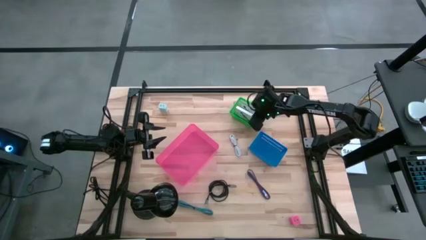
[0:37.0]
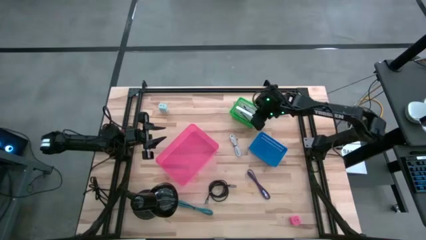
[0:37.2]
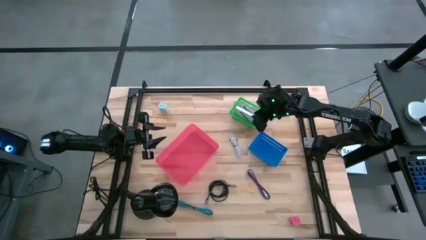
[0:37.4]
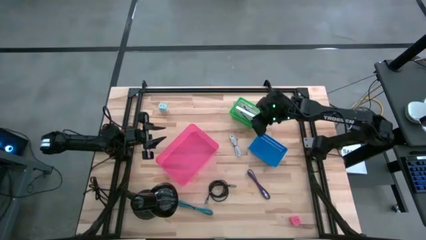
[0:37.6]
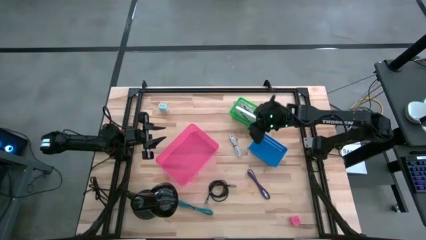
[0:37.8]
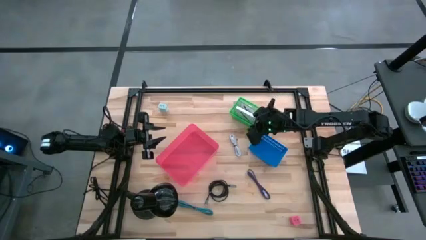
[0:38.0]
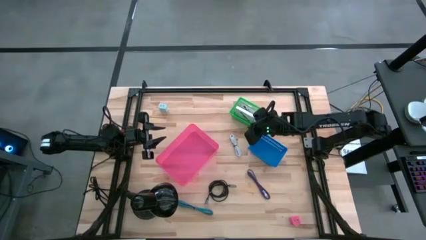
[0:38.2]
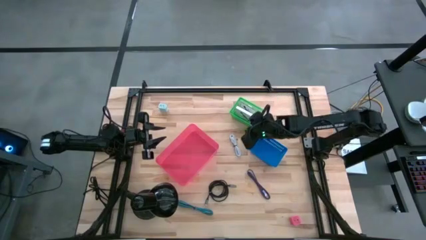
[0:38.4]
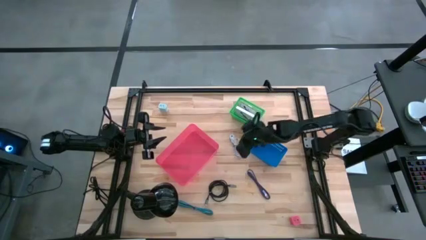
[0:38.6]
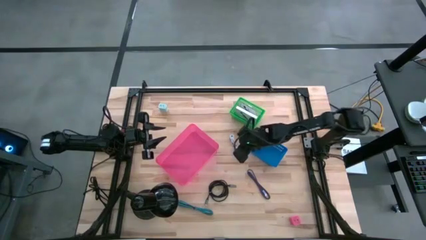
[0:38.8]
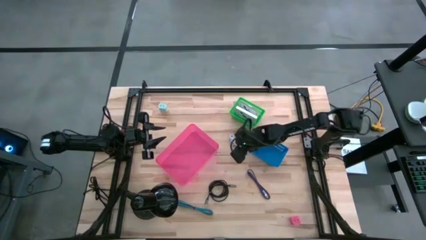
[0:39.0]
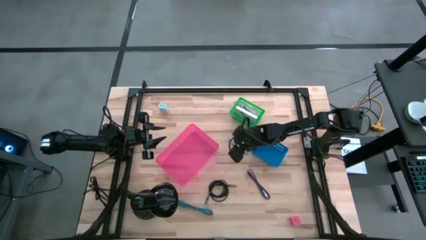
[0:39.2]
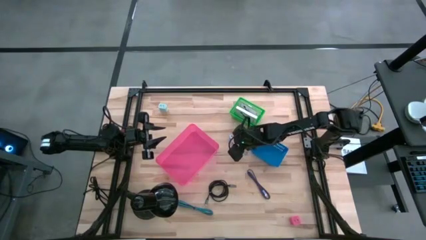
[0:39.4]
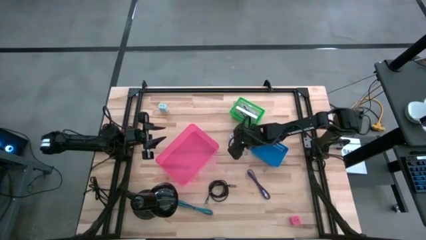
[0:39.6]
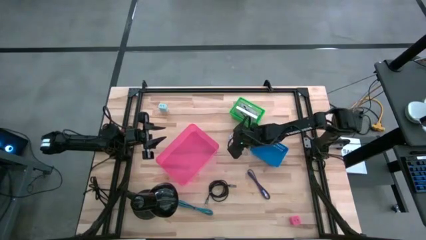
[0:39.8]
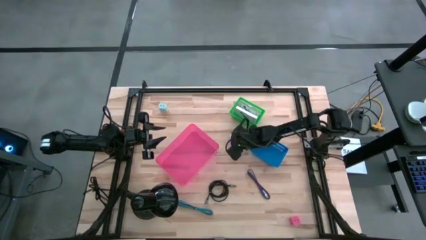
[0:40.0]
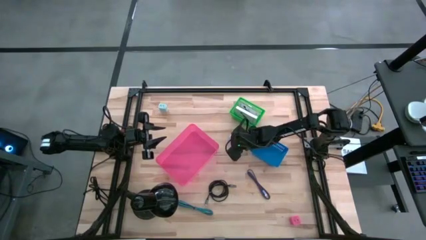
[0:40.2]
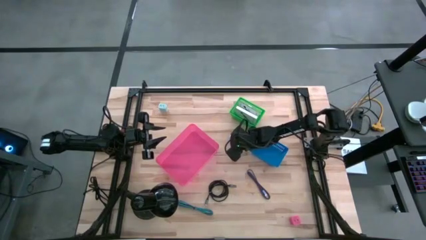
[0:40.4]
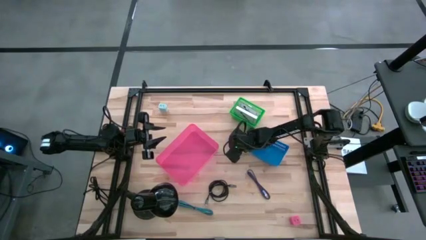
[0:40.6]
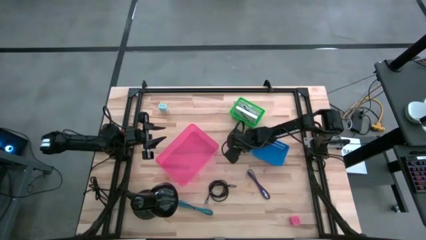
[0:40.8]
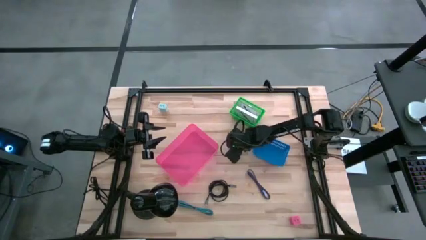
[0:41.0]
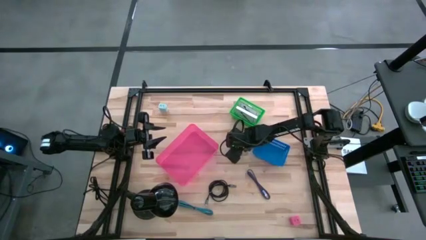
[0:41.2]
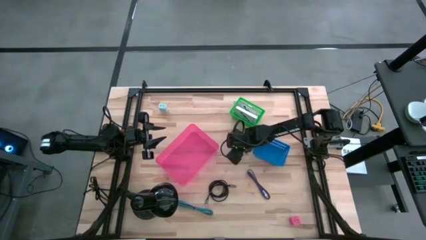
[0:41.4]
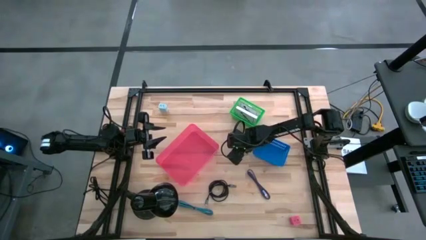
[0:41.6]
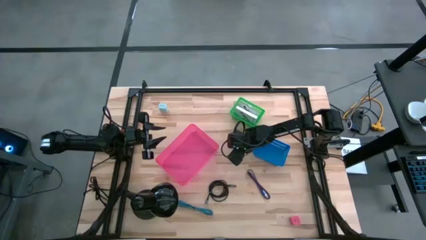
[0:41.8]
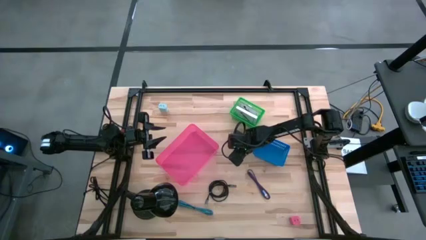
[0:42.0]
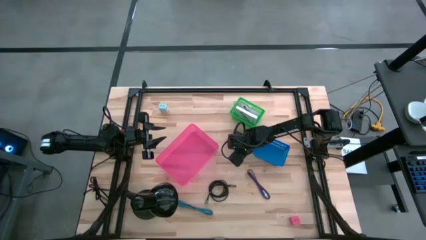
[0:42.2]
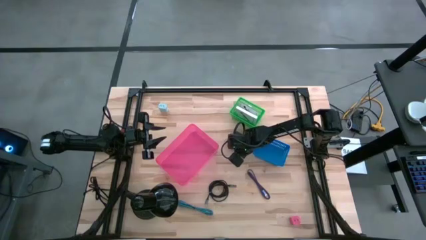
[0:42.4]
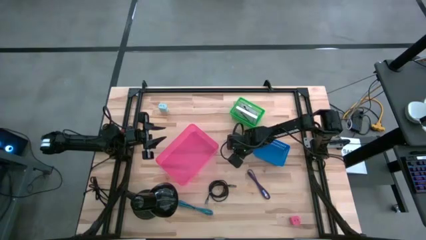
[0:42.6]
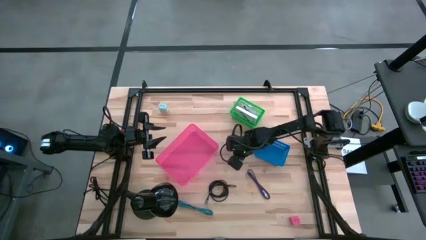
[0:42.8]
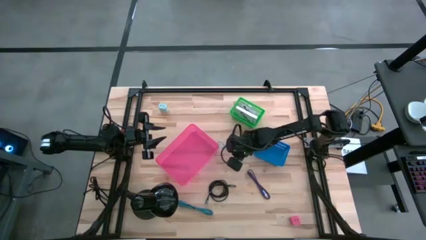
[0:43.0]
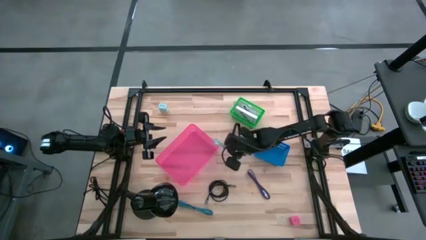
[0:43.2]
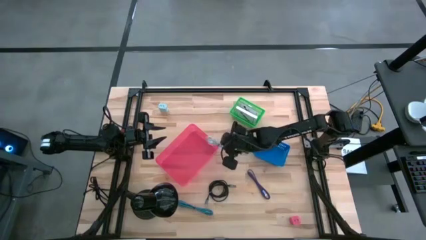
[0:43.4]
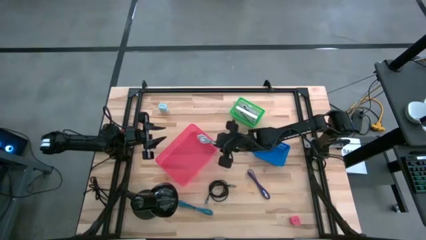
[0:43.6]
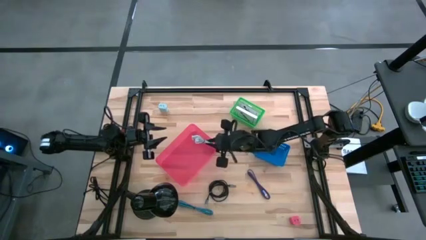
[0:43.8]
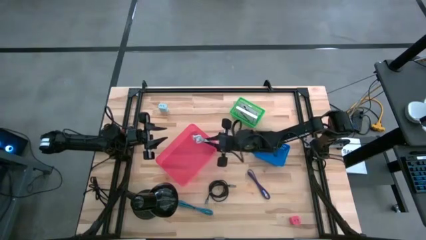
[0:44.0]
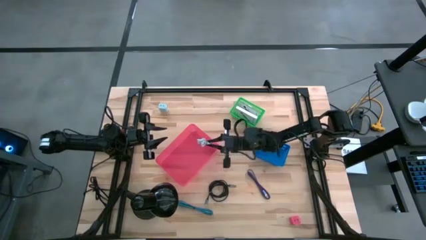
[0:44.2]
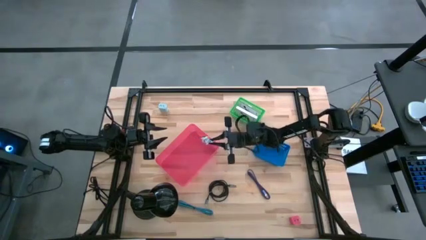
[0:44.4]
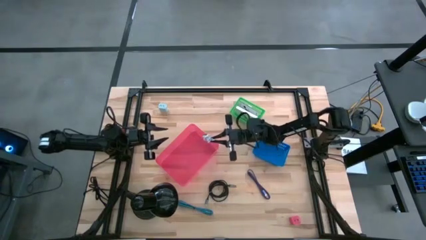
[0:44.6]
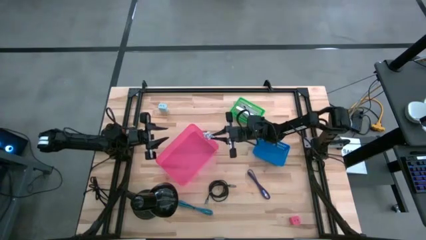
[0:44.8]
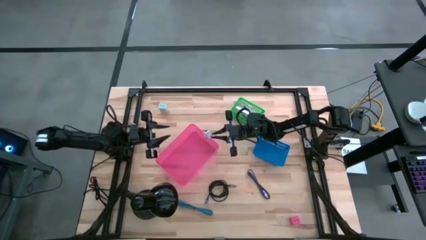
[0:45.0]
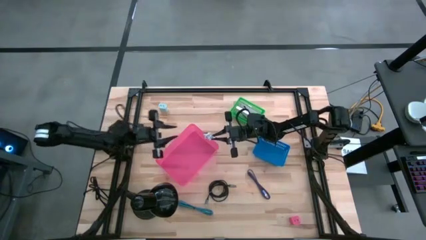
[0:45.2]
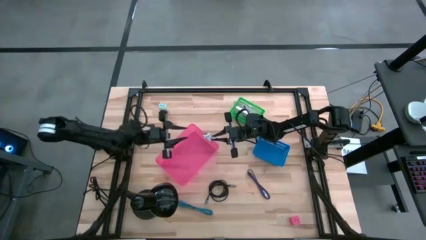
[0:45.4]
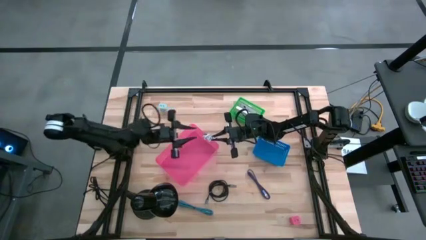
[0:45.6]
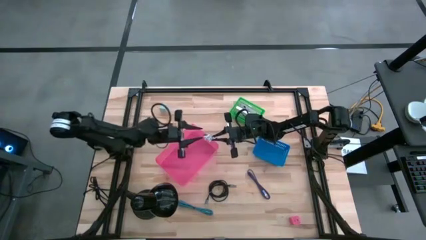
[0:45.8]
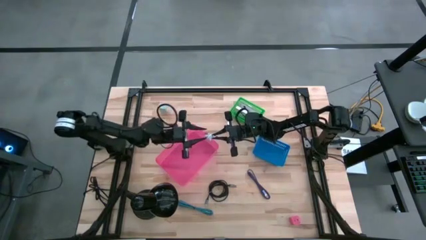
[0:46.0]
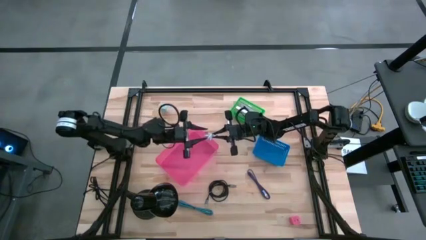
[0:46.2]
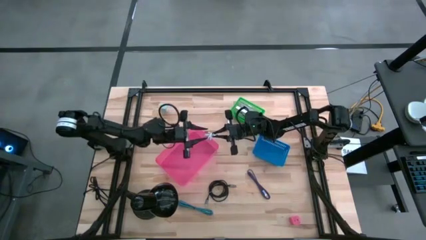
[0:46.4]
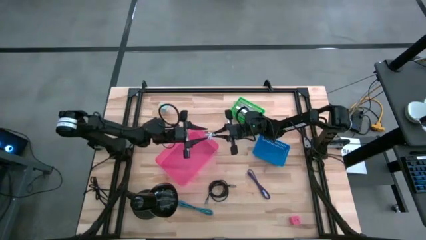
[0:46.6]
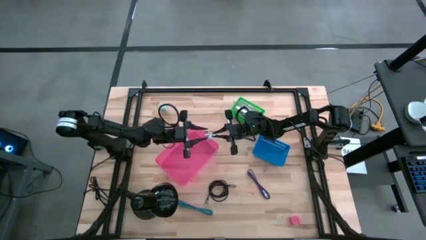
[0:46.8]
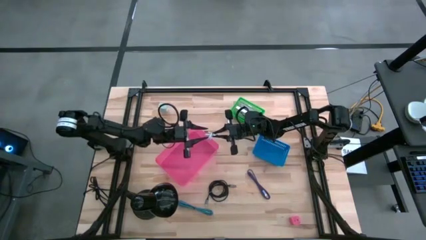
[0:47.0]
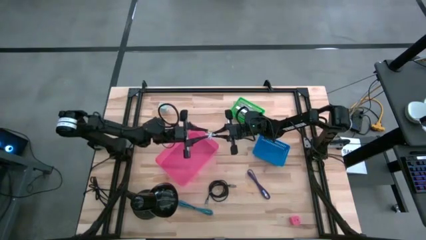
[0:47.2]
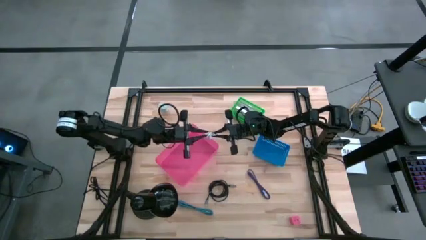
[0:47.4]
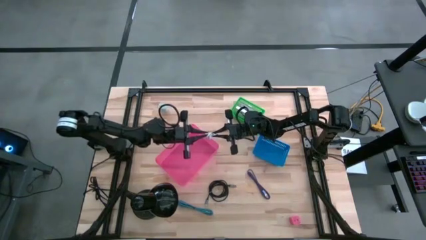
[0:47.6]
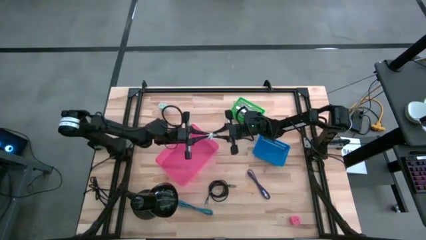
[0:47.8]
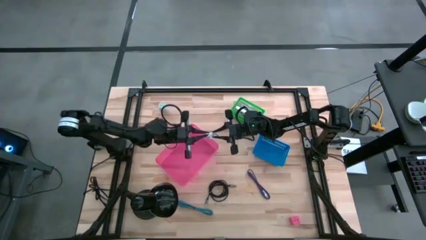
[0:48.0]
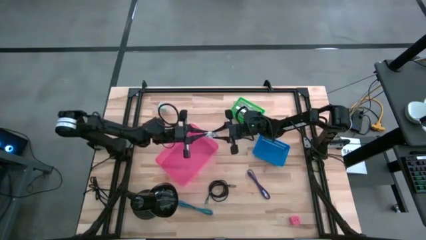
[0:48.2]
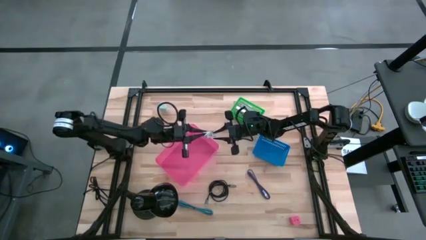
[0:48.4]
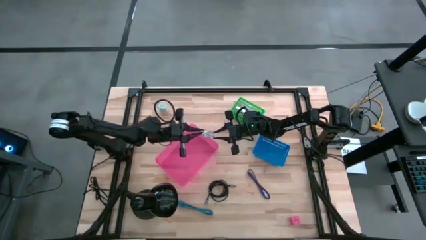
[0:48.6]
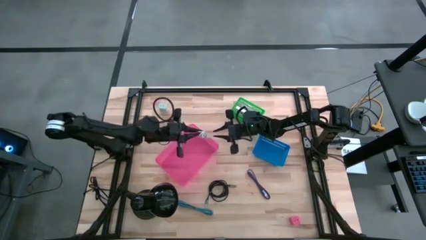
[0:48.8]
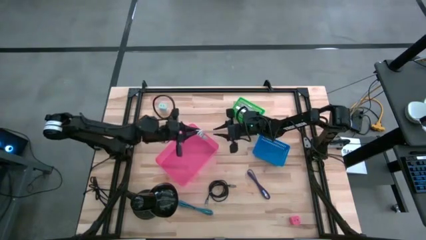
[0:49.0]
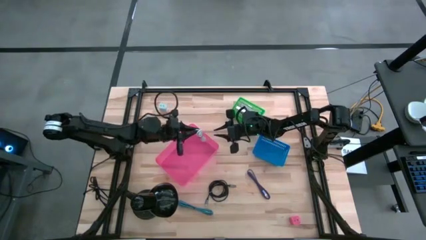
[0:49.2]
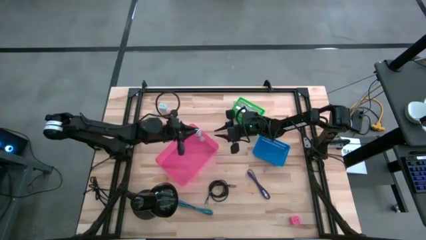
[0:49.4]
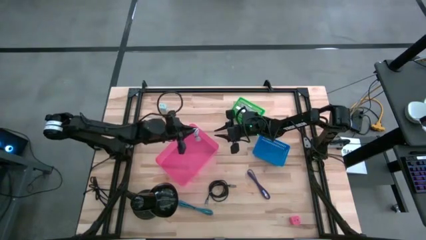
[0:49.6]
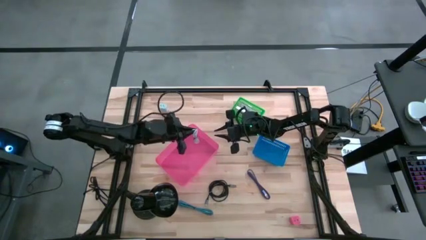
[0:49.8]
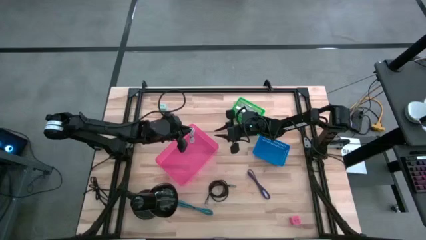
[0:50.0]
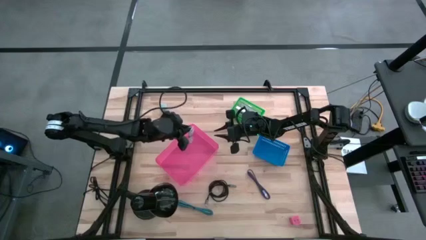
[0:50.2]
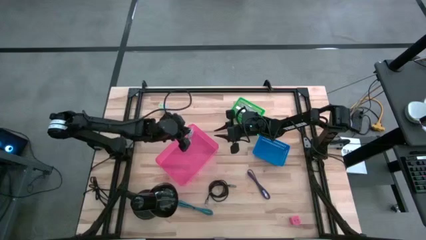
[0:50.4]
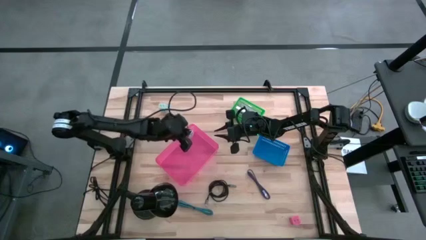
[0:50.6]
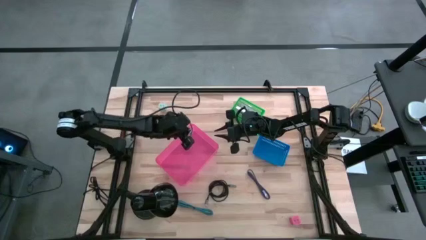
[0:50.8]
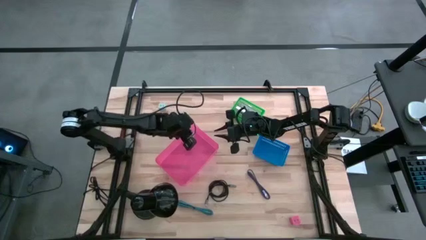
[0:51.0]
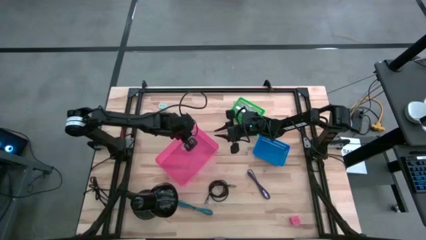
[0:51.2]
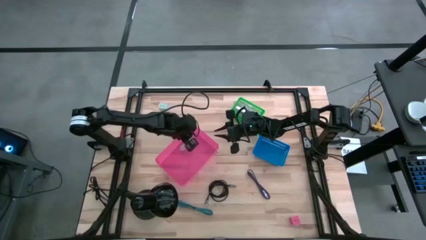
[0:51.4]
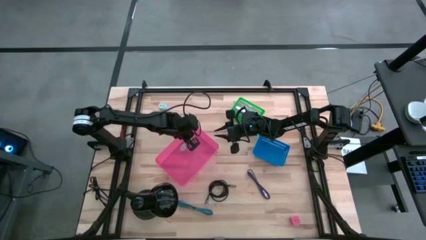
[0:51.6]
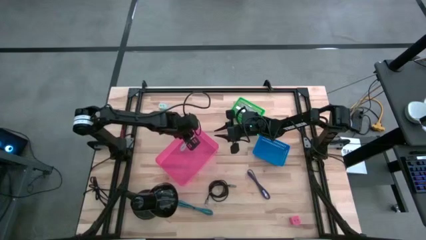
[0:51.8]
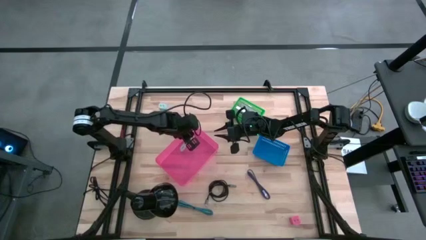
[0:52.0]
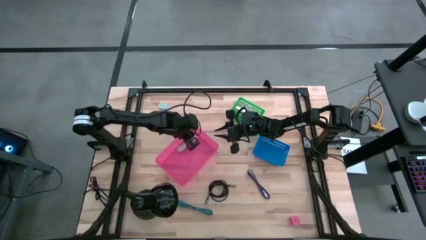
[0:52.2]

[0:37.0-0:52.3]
Task: Pick and place items into bin
Put the white charger cable into the pink bin

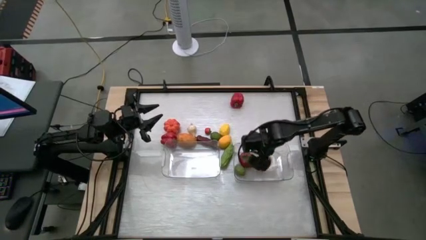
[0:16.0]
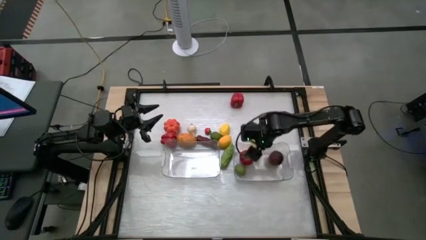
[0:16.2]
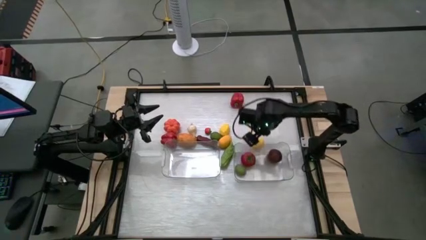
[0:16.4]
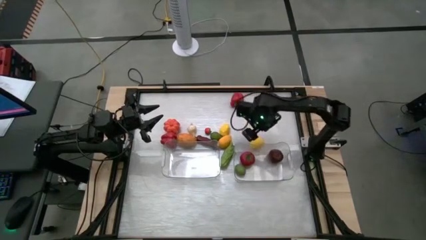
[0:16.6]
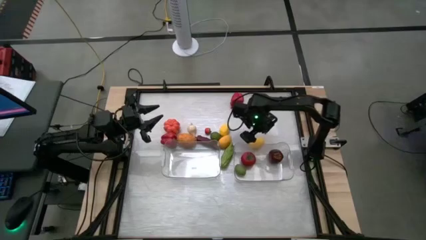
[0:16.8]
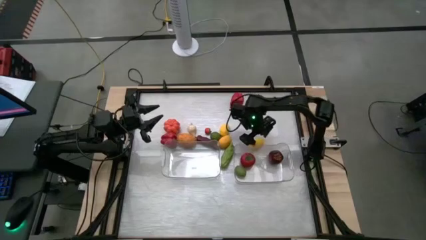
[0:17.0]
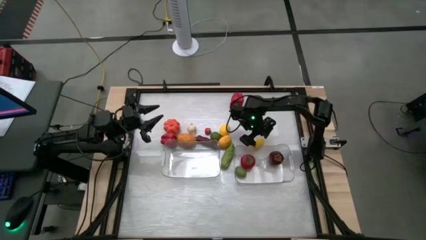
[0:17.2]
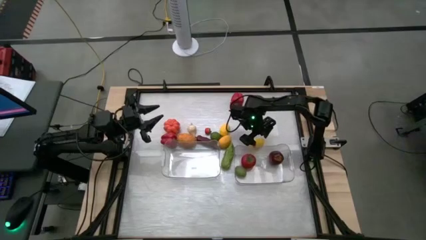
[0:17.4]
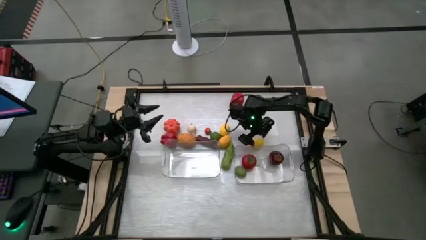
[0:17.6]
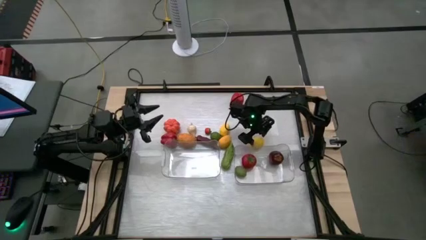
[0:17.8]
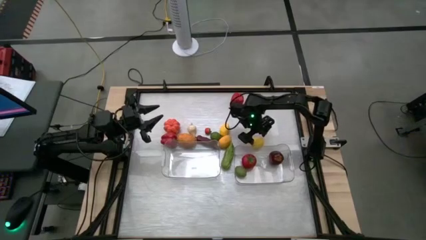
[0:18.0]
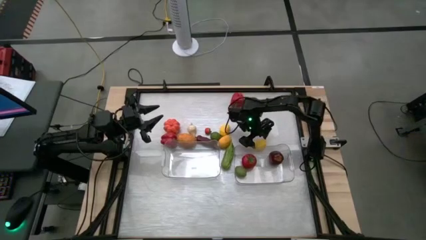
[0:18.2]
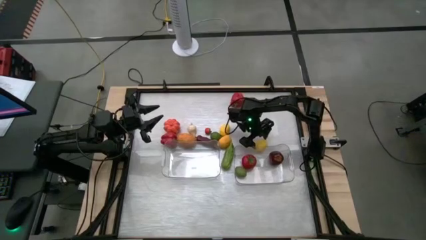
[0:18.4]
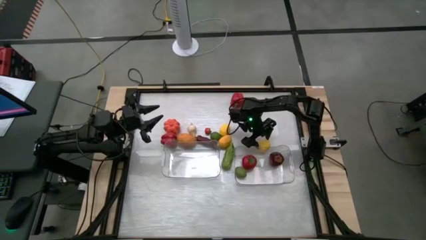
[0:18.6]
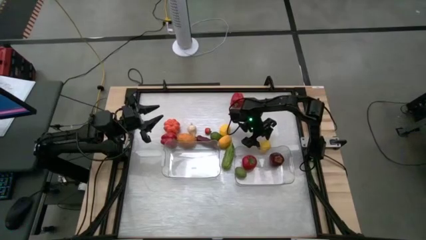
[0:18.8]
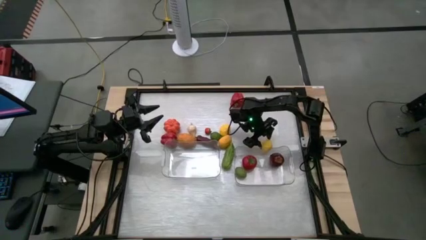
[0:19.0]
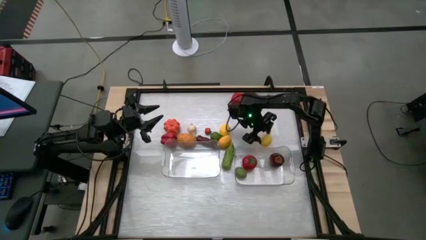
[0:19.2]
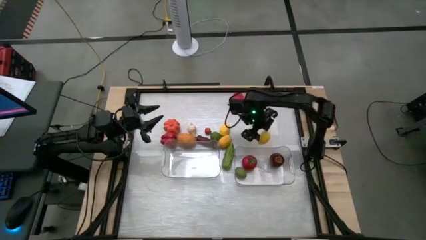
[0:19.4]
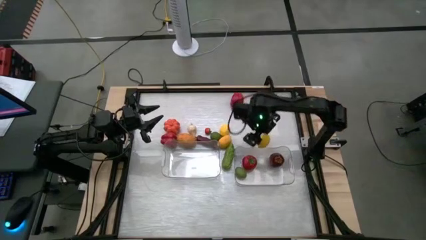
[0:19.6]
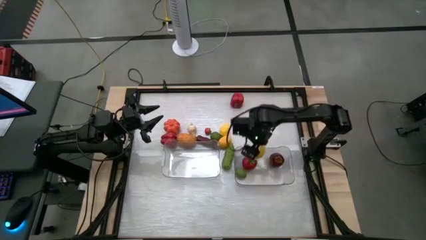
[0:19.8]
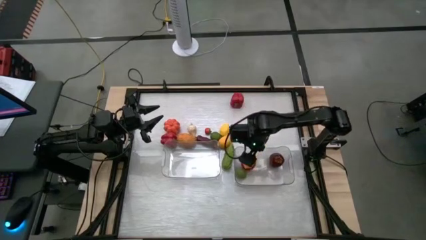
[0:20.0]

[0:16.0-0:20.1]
Task: Sort produce into baskets
Put the bottom right lemon into the right transparent bin
